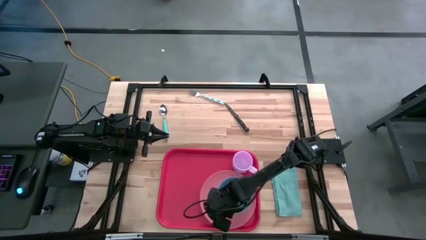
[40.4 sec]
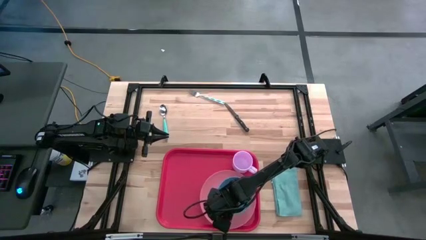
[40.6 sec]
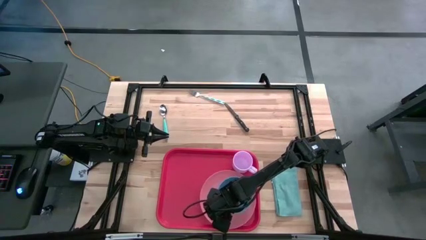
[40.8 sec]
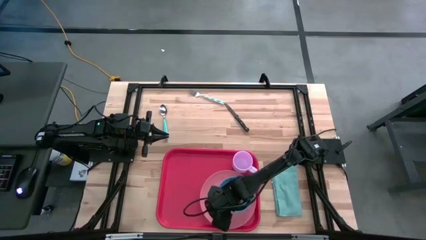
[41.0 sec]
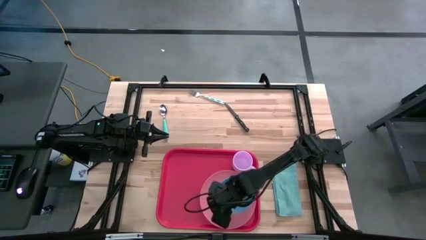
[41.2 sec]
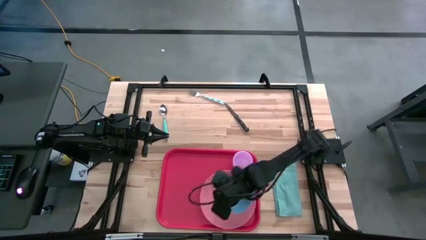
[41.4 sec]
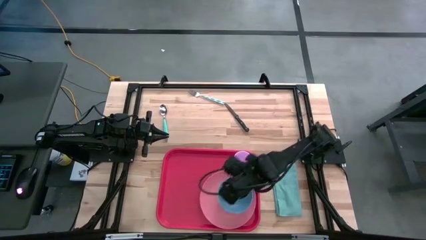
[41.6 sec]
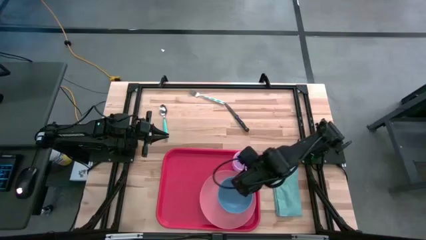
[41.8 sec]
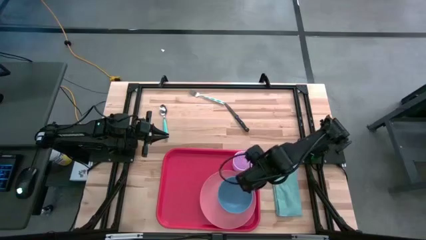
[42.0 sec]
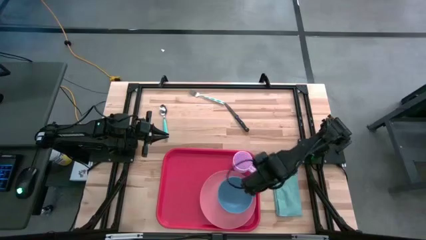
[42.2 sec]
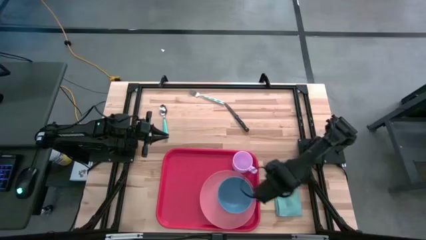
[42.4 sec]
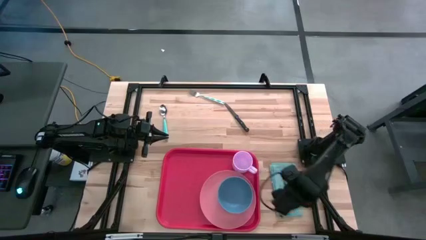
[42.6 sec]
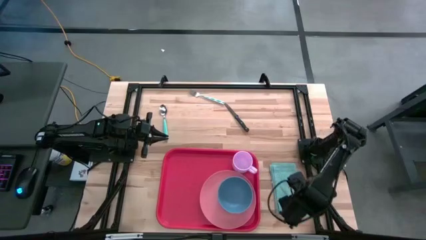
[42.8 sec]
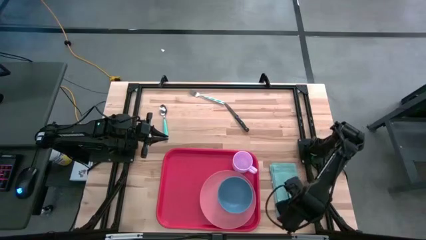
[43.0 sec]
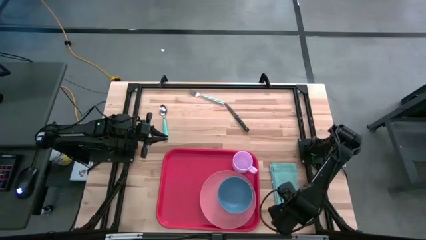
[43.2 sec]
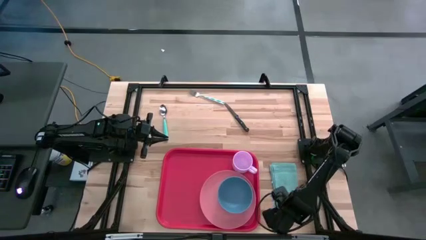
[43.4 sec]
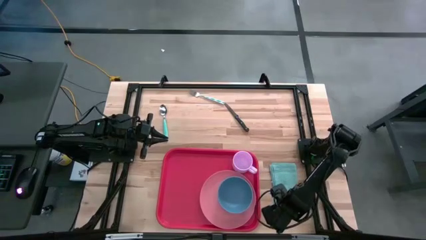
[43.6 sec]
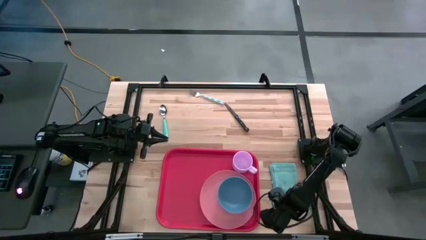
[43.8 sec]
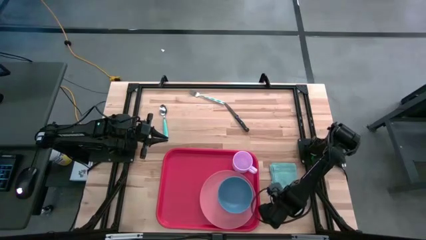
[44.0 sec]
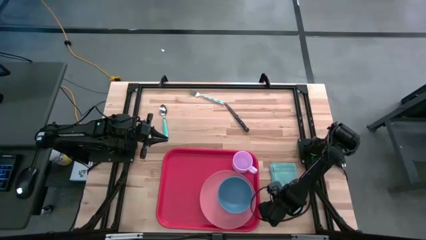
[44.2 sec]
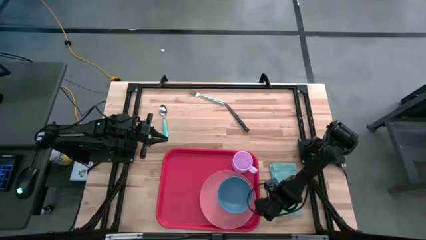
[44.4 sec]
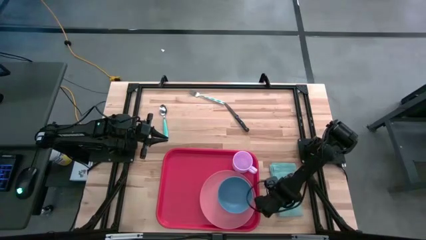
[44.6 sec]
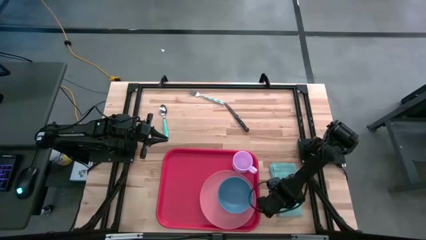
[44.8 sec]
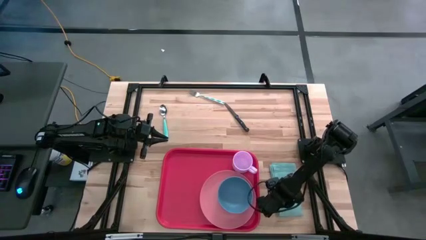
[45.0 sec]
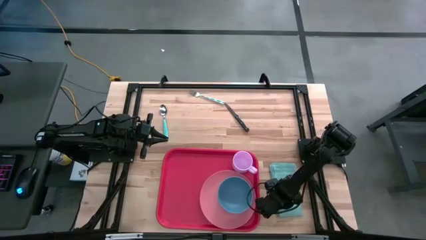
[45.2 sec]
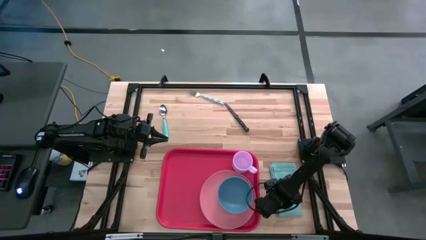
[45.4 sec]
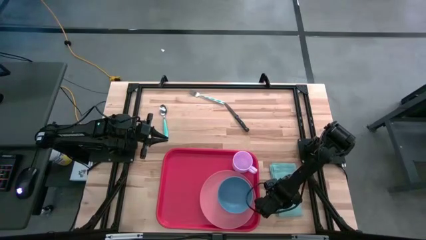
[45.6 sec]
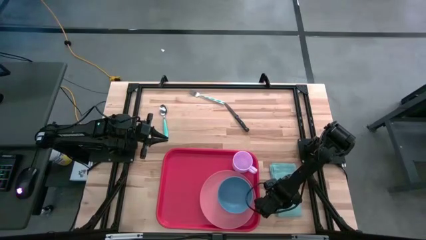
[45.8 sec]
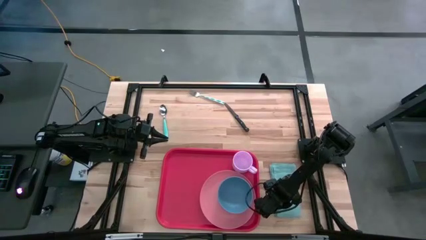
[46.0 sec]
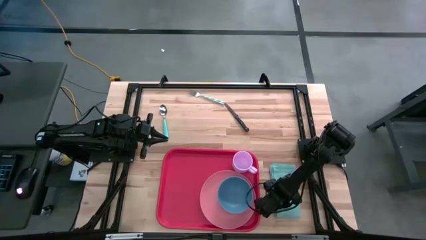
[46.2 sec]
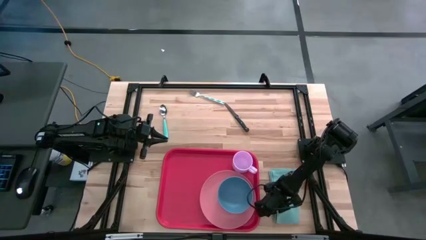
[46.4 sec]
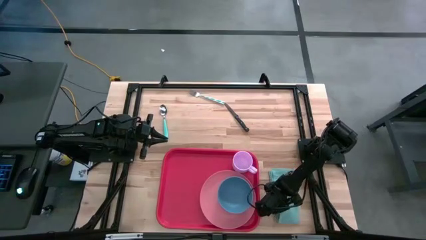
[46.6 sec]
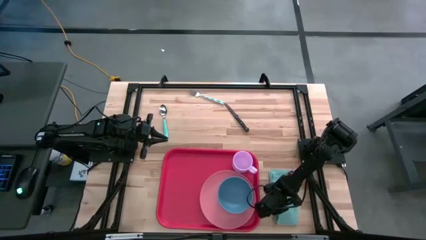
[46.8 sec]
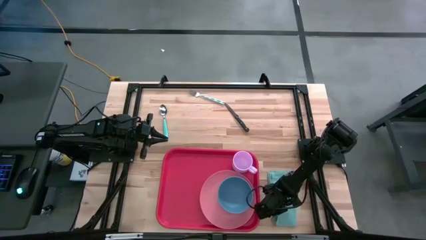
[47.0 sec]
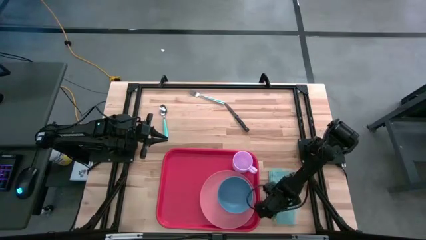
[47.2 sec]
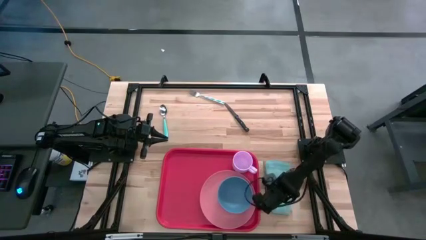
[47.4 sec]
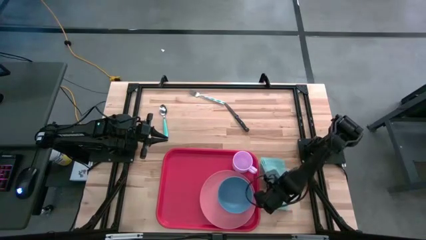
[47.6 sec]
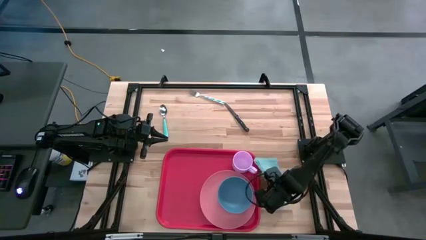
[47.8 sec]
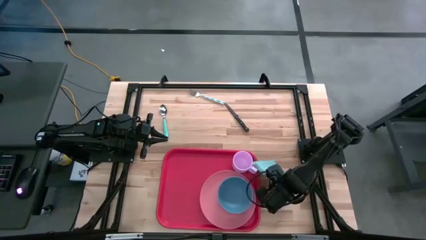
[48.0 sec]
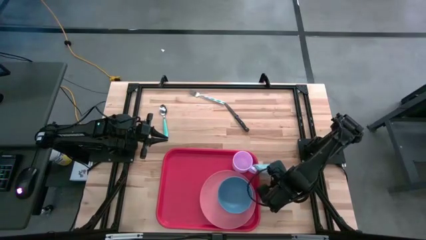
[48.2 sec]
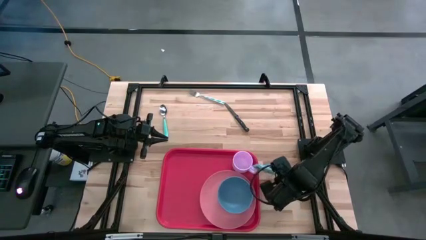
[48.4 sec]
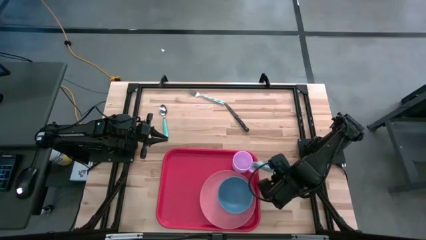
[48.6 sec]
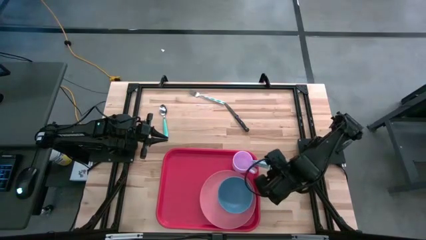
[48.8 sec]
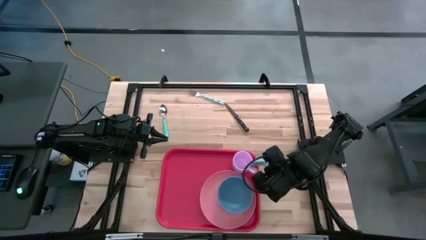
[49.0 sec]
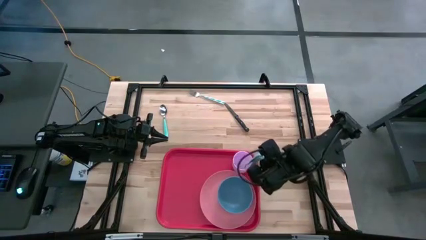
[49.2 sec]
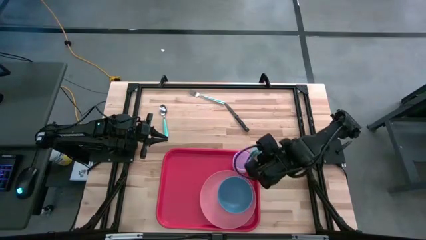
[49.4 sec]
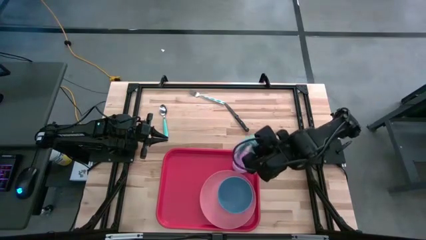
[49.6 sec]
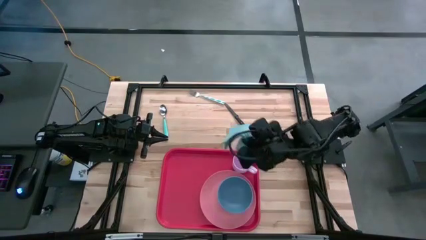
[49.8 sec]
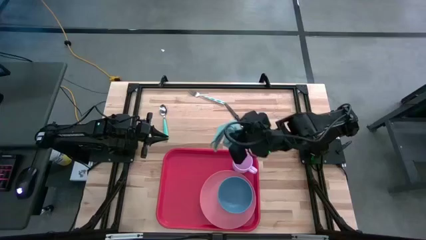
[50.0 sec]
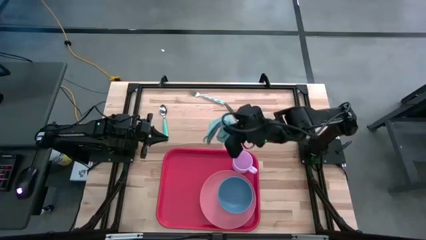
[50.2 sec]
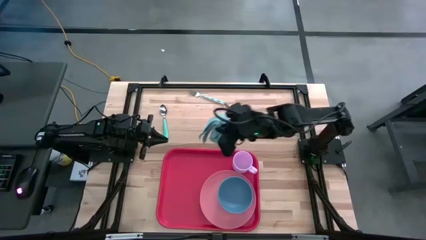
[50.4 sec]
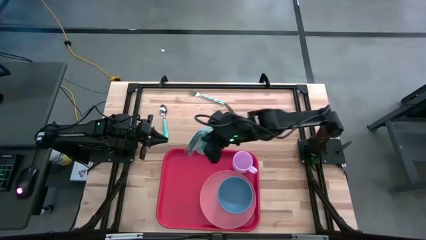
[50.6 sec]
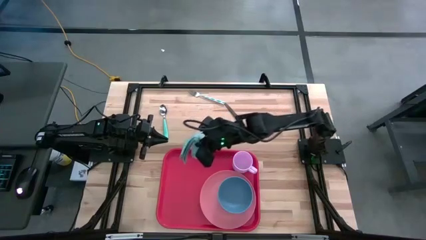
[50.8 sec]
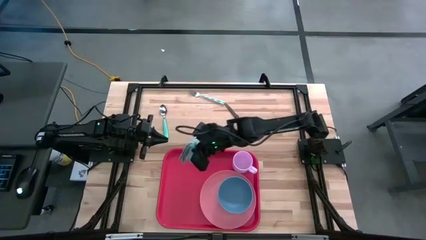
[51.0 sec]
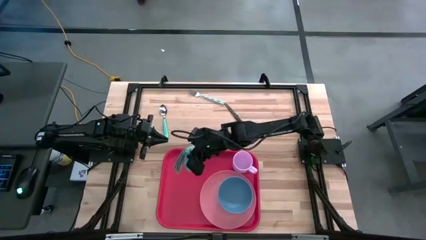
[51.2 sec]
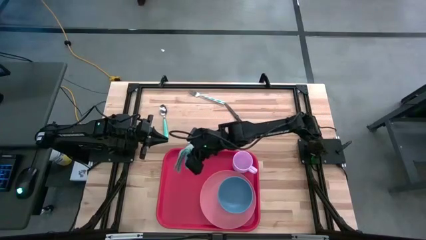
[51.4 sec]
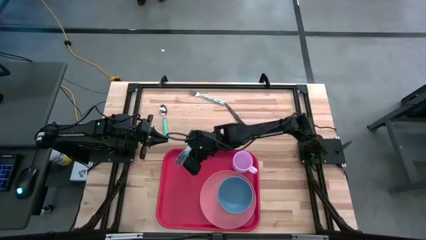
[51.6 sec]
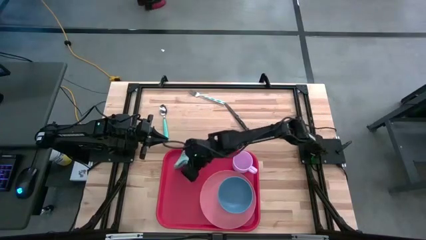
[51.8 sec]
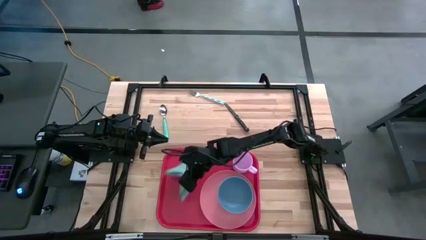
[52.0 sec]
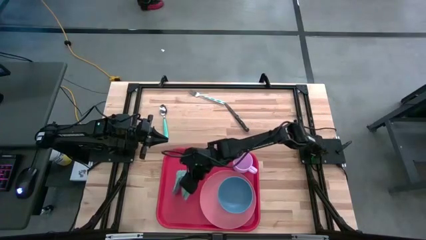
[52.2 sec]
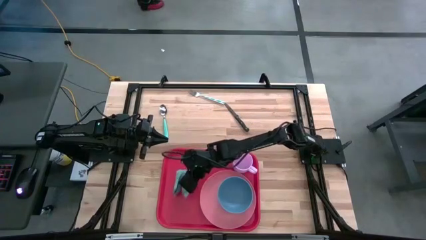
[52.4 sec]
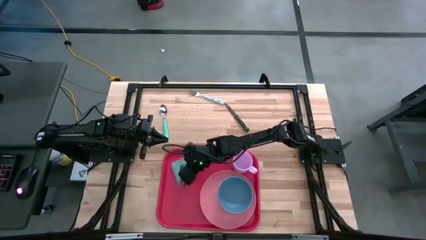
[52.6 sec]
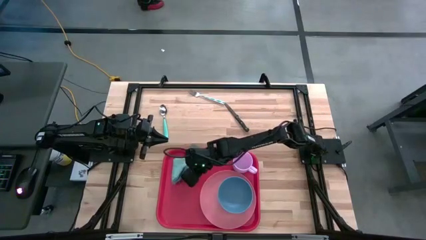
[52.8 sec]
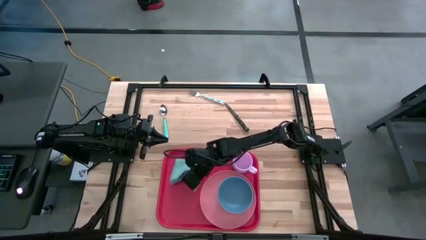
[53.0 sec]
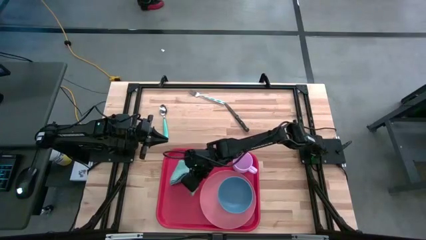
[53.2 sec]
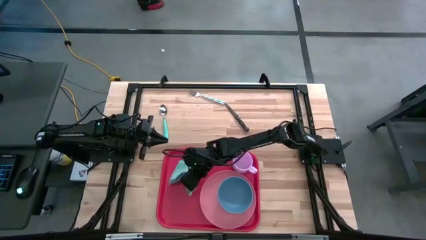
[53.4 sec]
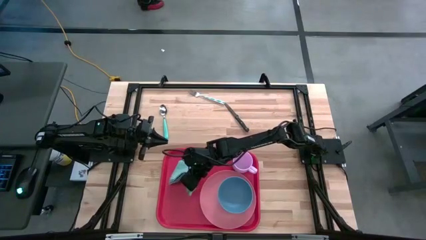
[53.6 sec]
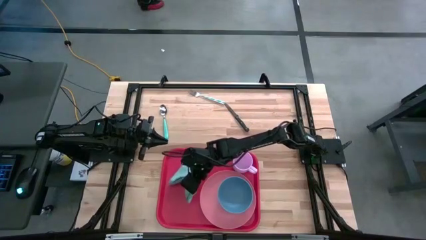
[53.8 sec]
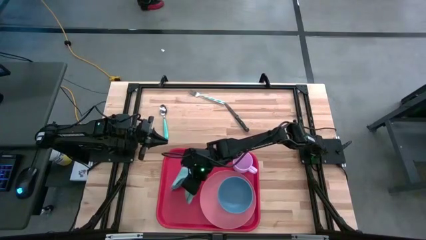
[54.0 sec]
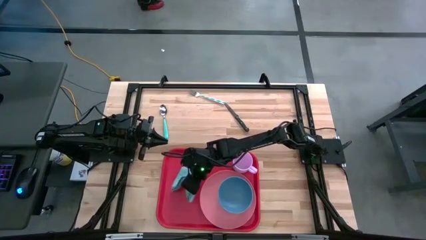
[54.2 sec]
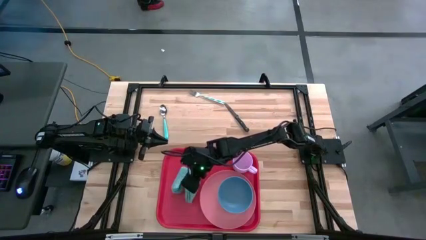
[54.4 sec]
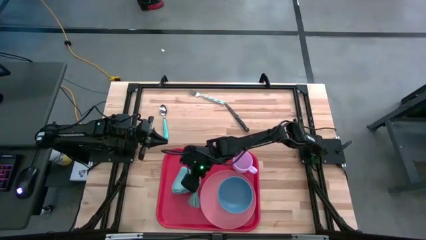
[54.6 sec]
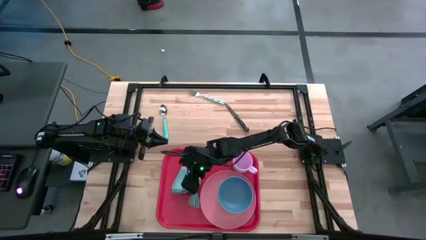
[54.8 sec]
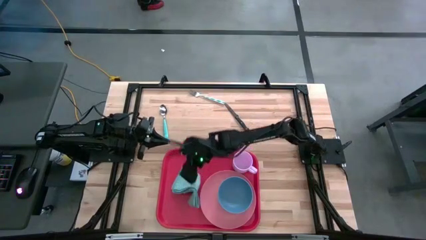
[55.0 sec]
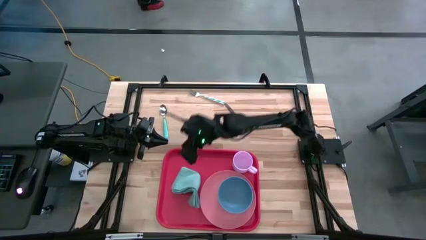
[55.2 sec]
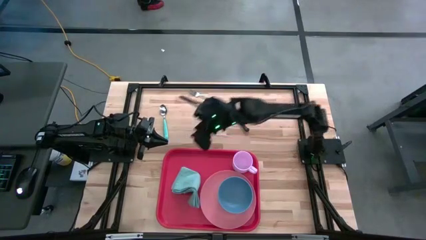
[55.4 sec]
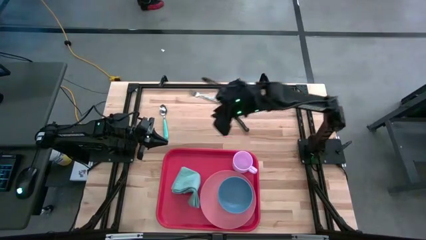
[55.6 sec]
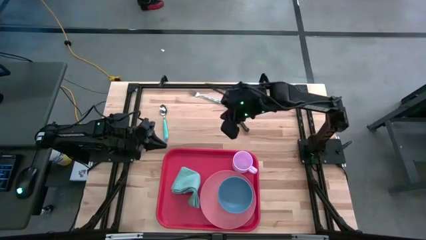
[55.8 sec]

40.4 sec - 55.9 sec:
Task: Set up tray
Put the blue table napkin on the red serving tray to the left of the pink plate
